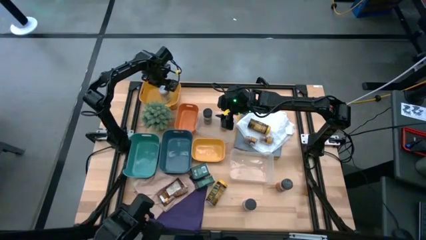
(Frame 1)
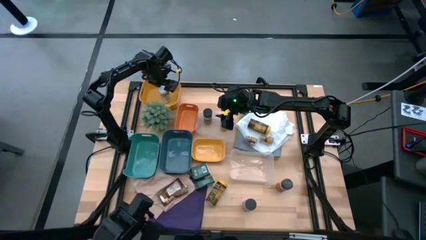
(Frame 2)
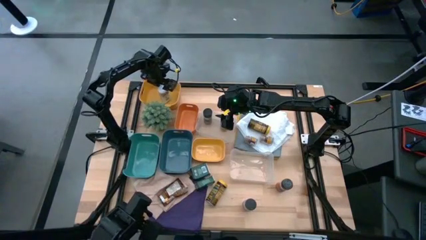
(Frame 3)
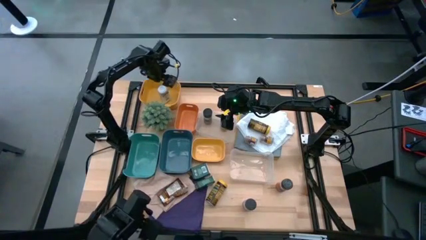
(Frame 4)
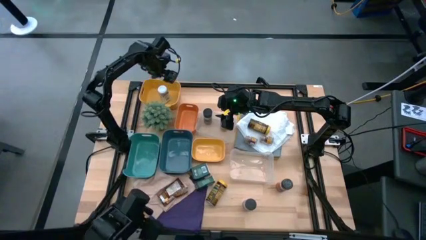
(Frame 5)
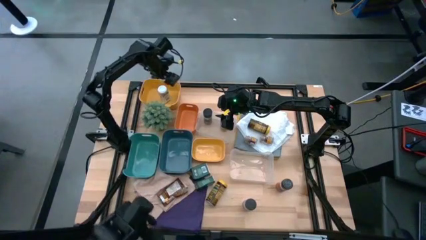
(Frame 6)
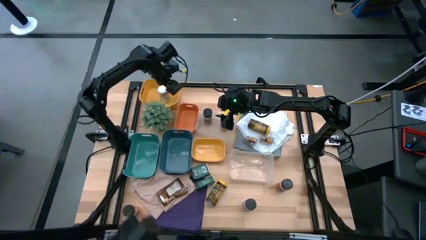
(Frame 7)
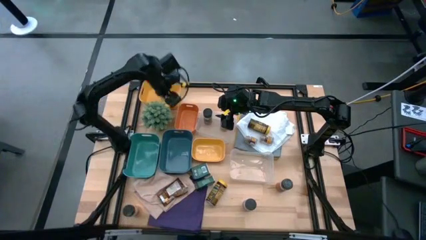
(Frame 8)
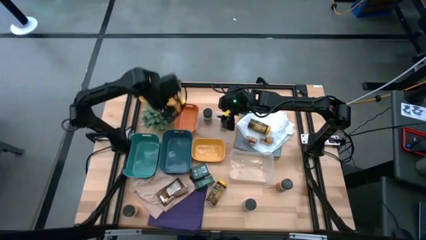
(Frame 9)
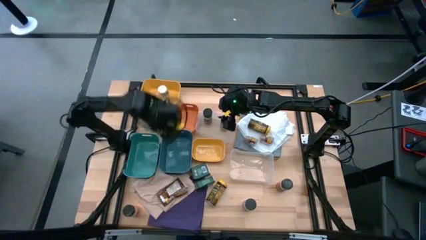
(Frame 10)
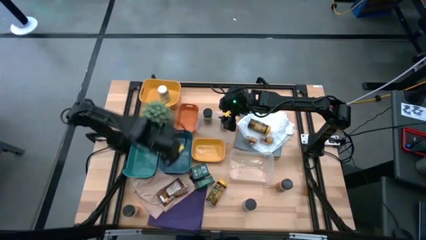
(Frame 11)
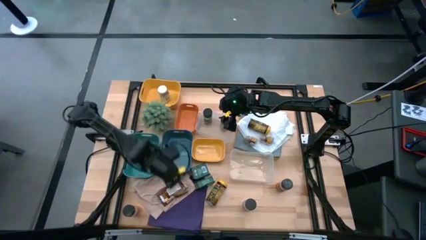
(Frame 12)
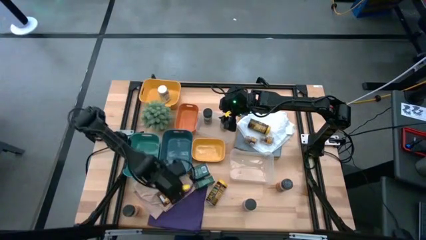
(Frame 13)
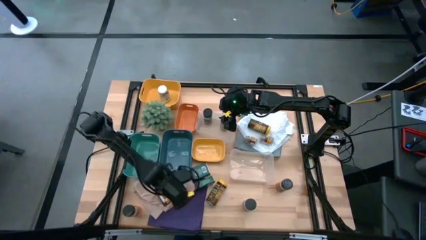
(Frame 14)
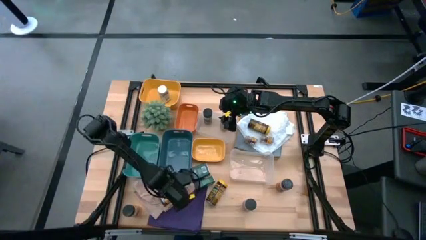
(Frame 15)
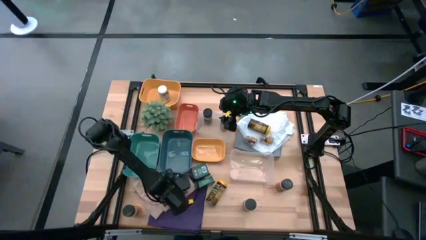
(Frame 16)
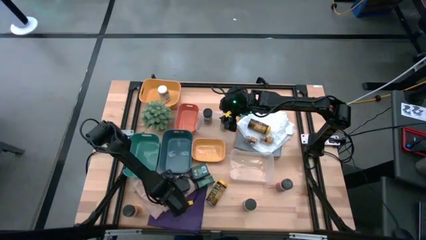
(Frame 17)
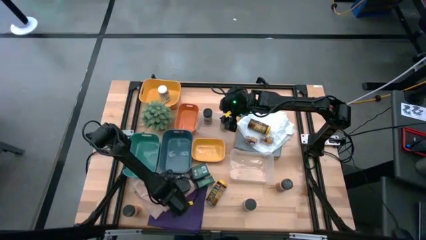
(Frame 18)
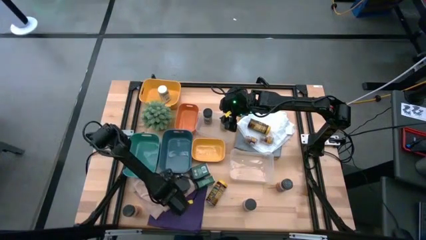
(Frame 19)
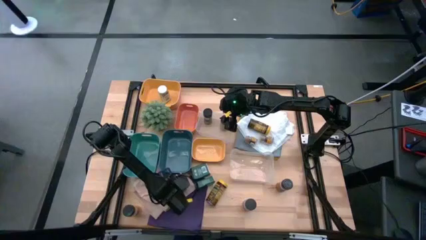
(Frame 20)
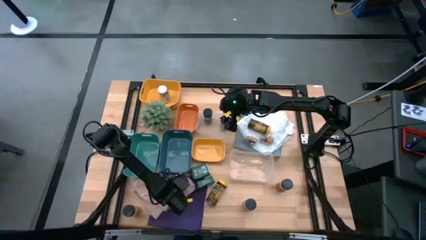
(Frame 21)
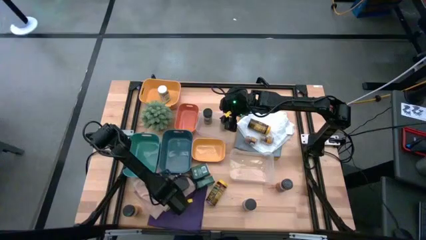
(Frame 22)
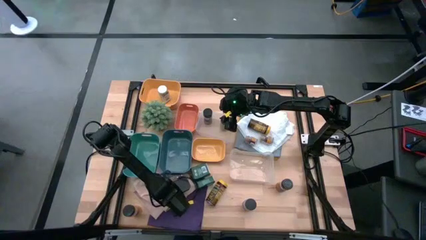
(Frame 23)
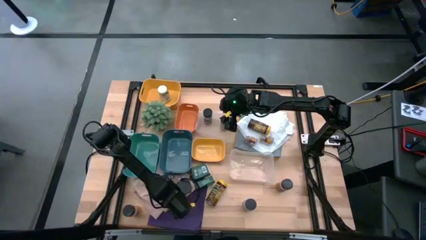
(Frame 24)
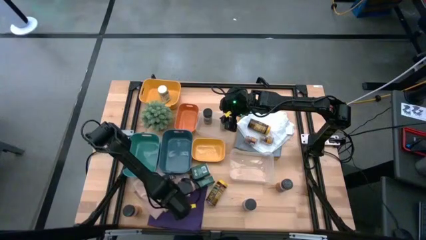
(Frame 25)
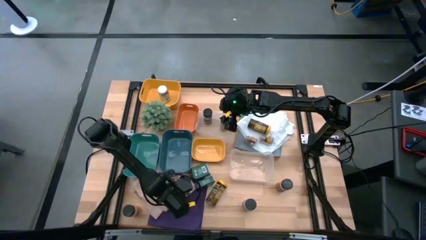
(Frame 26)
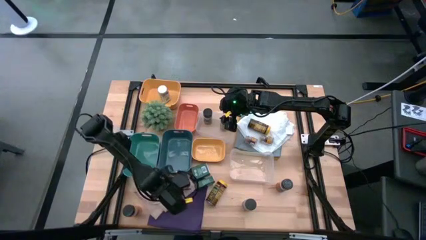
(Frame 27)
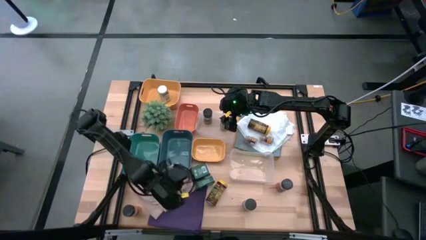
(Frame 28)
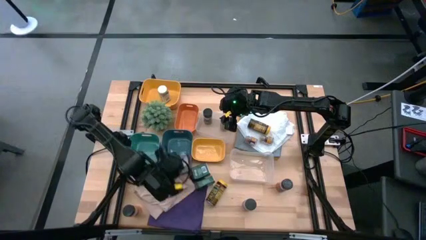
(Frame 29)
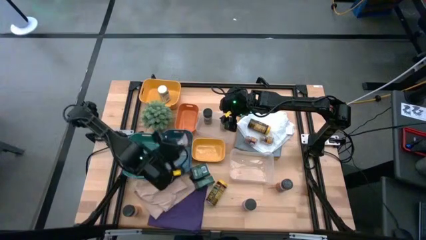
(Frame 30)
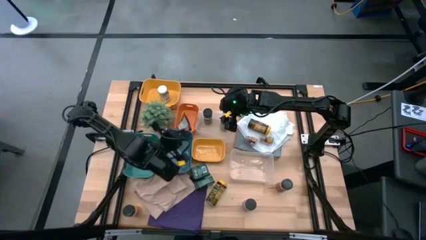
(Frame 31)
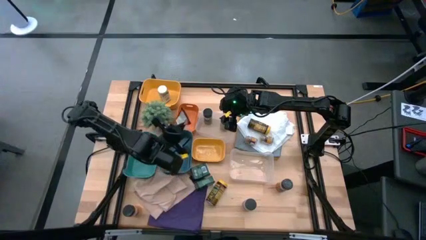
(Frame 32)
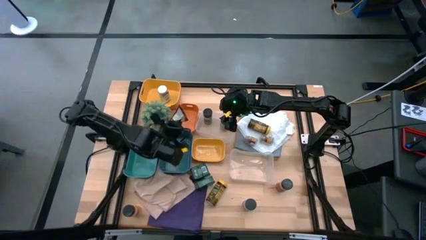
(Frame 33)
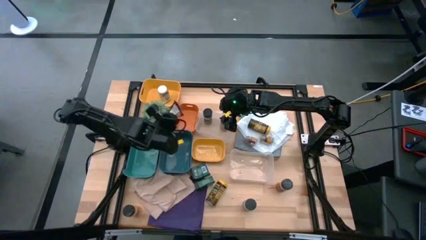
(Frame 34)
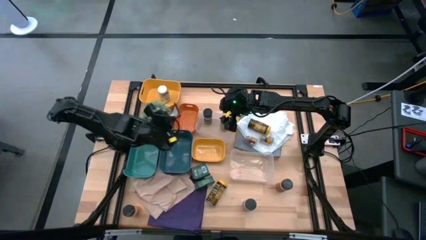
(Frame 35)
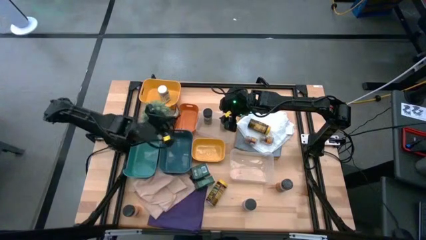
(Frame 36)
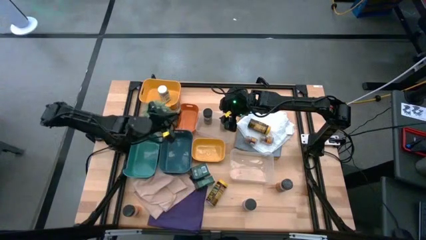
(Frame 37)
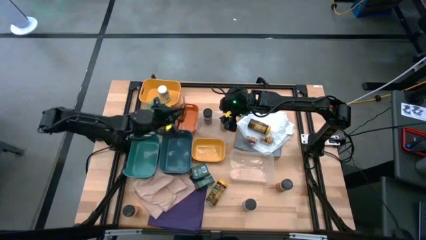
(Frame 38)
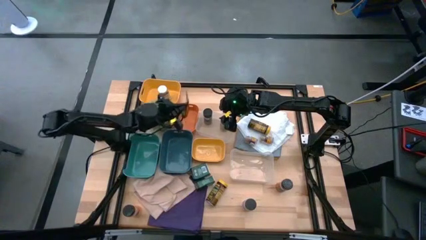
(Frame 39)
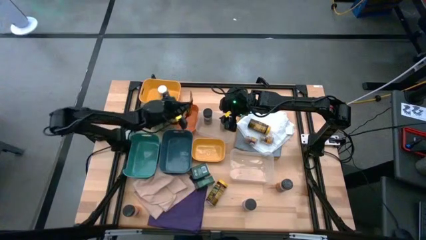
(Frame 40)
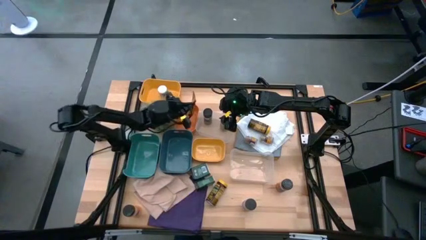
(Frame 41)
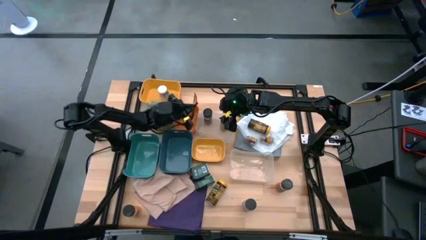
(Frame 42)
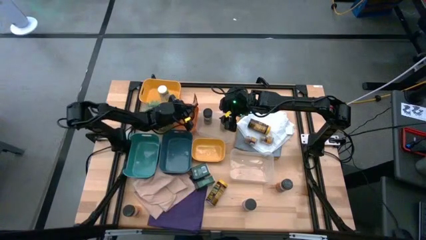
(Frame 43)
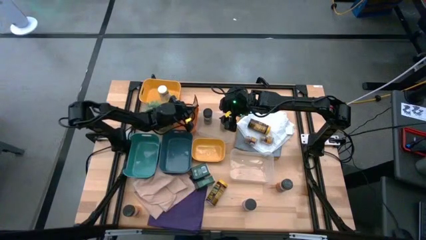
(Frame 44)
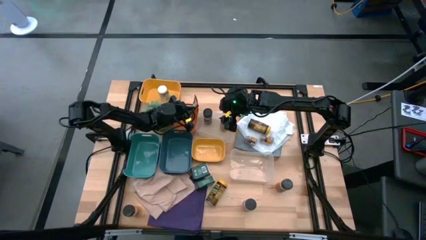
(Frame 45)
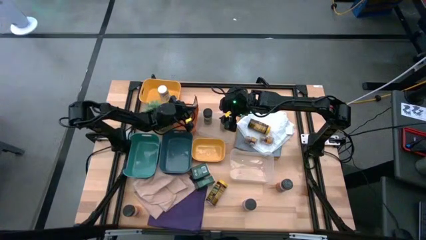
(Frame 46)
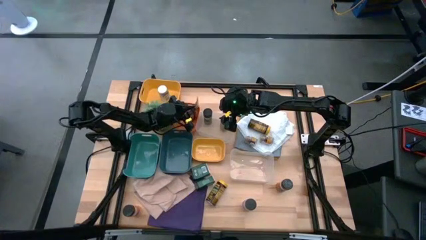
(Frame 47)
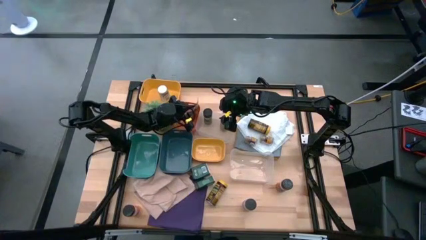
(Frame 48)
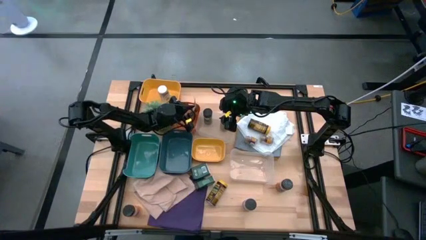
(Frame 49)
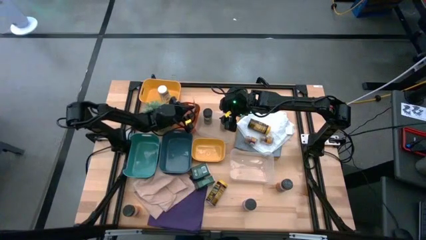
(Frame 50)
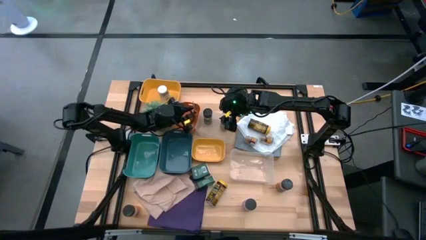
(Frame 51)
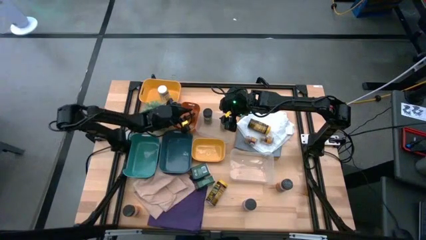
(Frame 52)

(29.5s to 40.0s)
Task: Sort spices by type
Put the brown seasoning pack into the orange bin

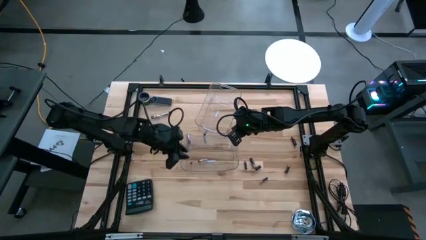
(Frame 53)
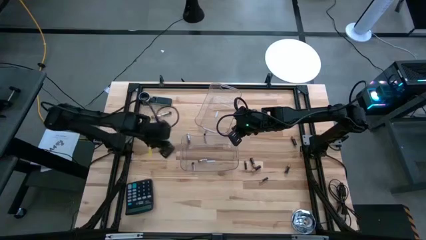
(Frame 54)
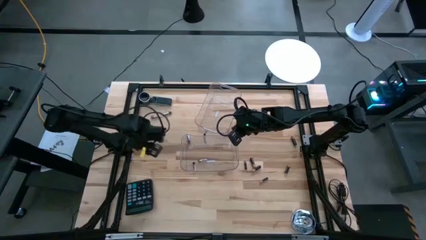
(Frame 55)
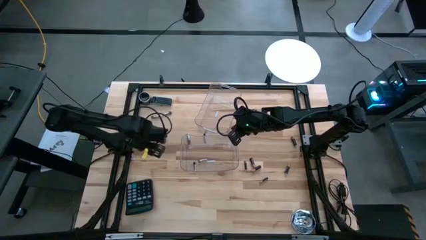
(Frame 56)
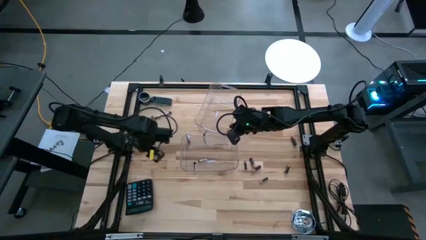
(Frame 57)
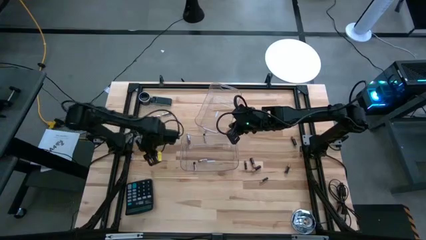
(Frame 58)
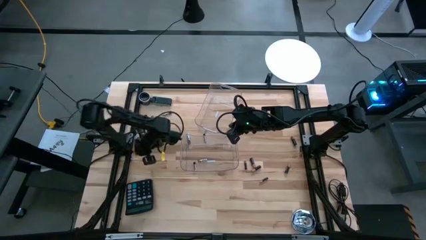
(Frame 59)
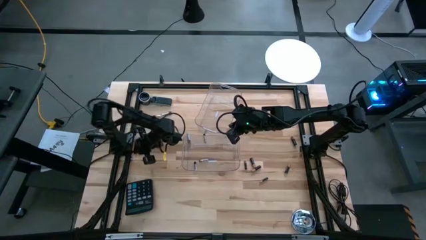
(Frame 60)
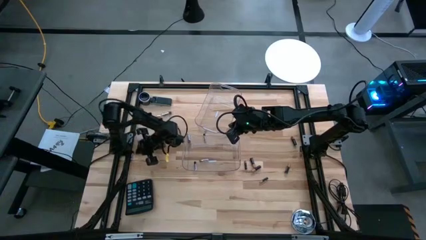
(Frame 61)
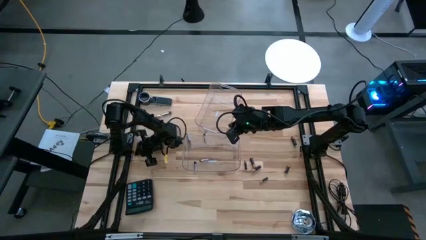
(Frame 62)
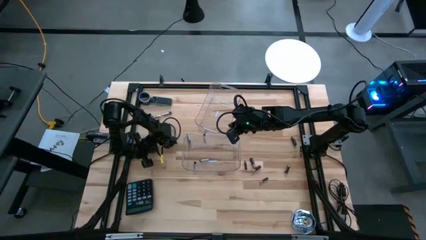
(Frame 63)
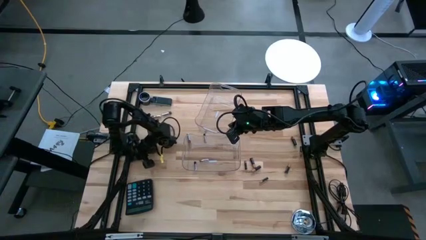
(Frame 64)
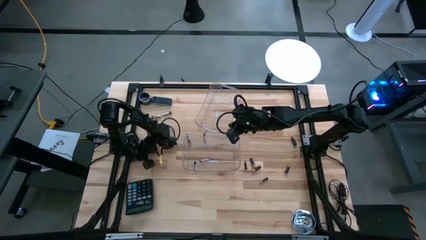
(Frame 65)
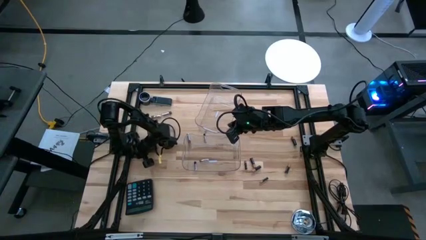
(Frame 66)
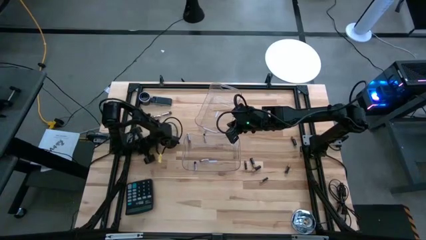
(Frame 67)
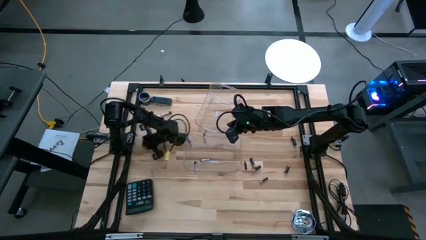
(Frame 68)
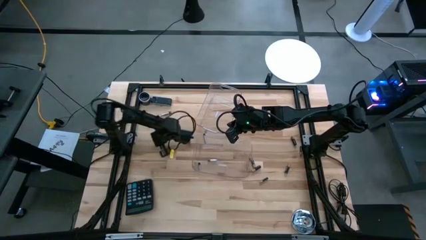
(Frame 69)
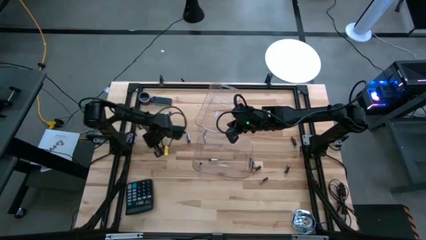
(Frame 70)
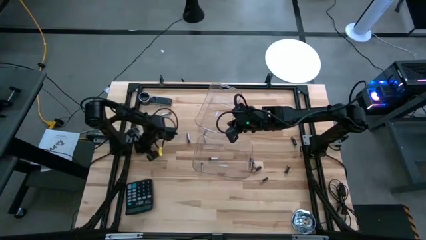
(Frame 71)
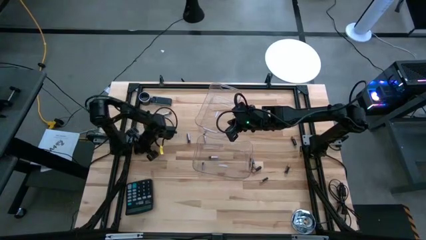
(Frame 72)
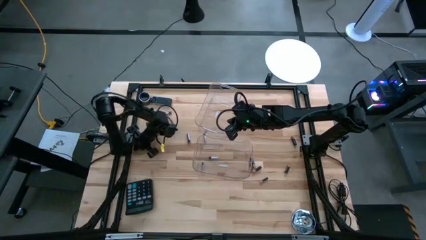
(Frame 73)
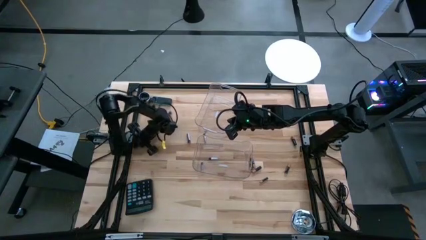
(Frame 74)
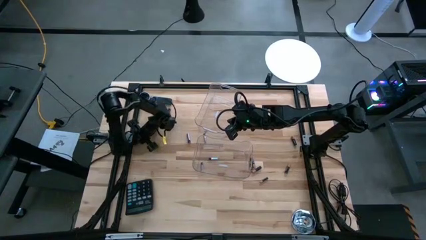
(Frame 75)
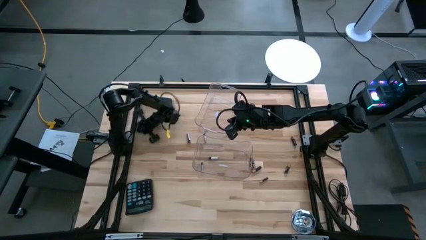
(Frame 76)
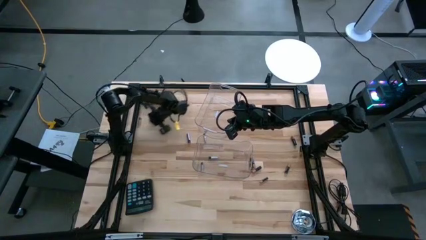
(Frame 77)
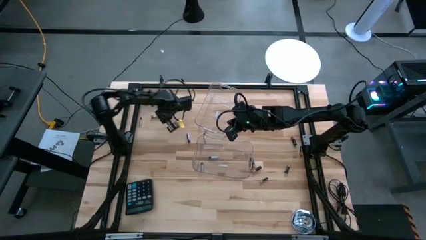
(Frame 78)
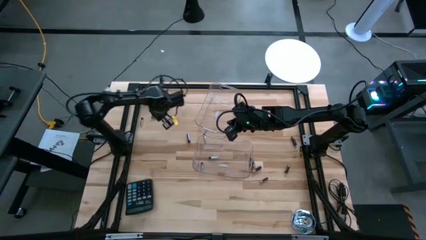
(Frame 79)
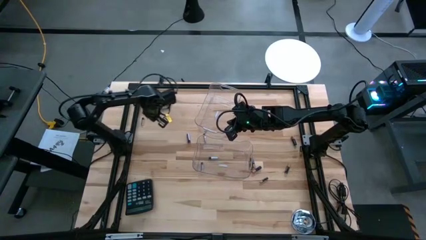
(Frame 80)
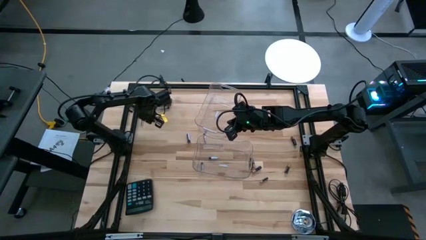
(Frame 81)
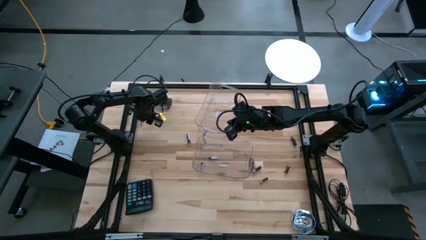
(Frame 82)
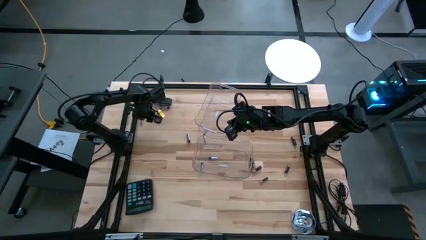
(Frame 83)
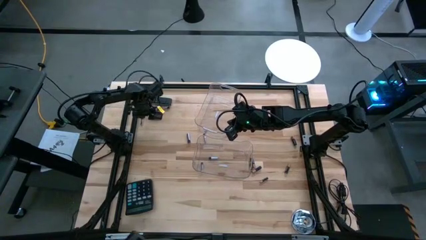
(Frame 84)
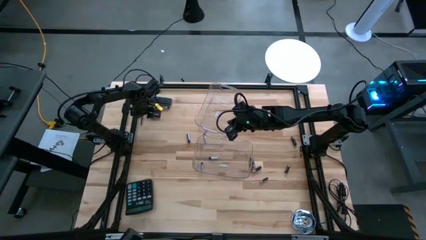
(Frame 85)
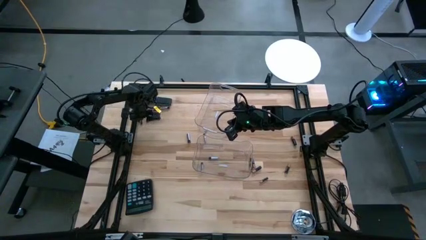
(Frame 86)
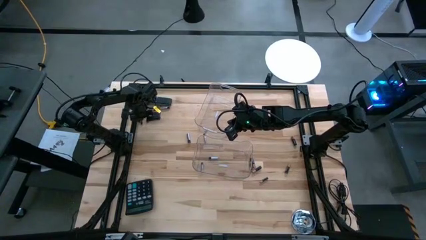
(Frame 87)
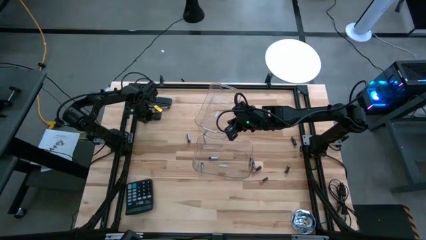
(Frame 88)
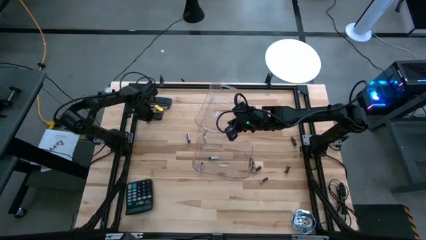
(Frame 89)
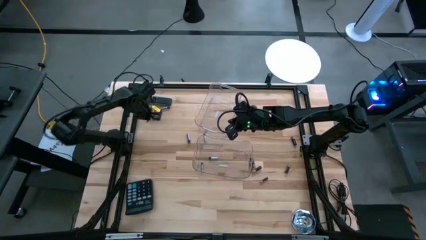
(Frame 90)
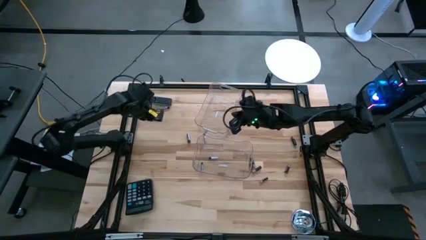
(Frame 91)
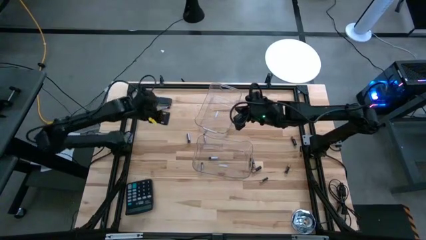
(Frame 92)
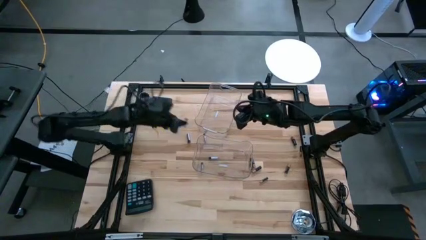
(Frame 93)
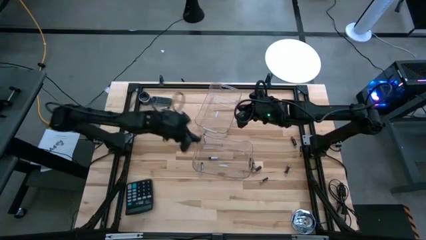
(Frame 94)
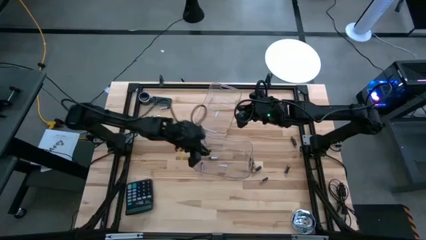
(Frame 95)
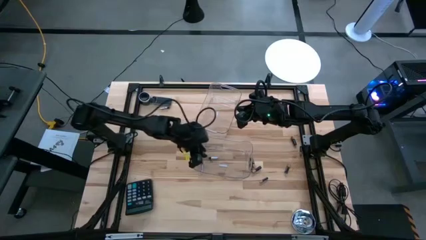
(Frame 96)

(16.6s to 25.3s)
Task: Sort batteries
Put the silver battery into the bottom transparent bin
